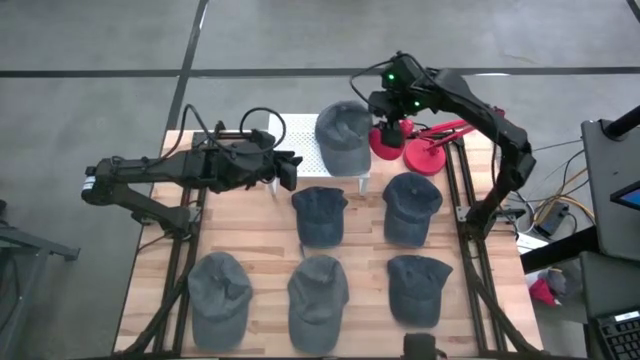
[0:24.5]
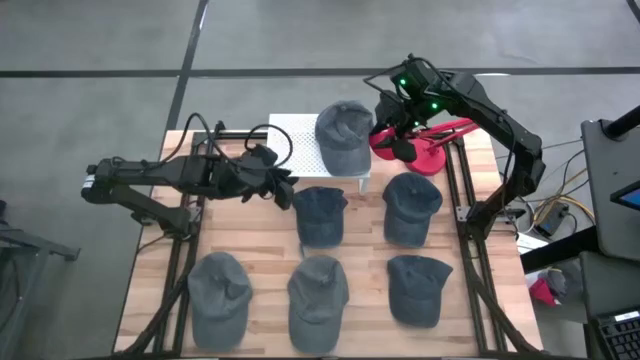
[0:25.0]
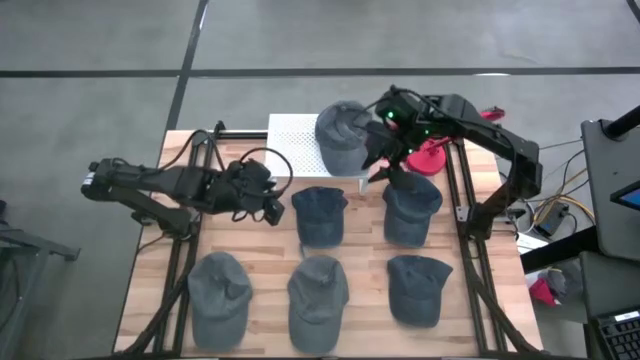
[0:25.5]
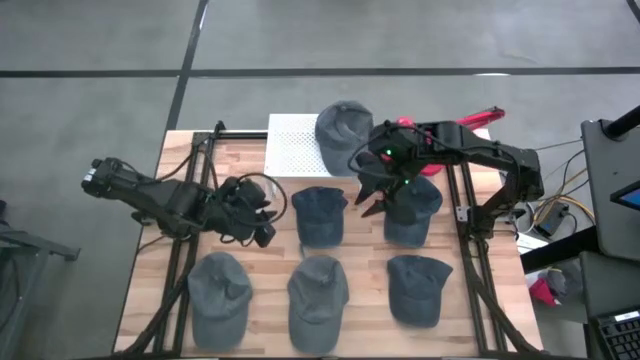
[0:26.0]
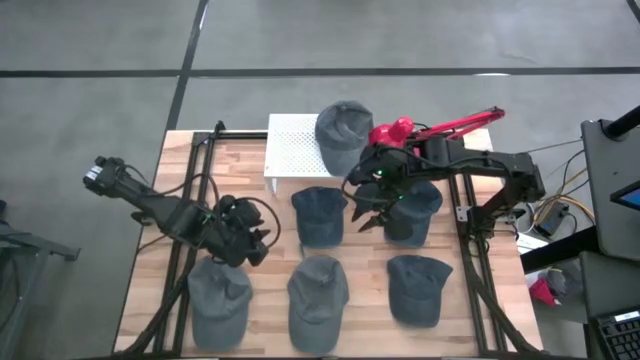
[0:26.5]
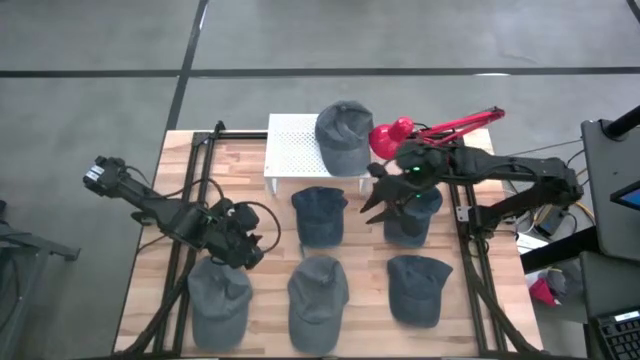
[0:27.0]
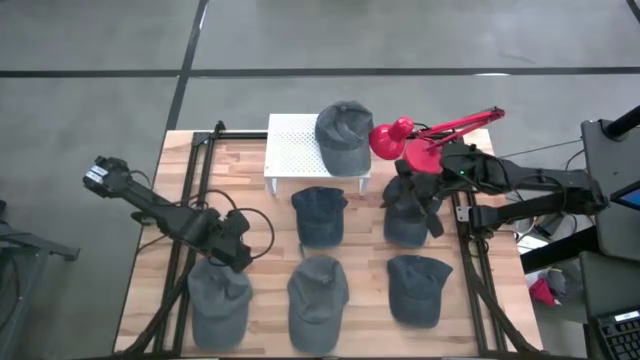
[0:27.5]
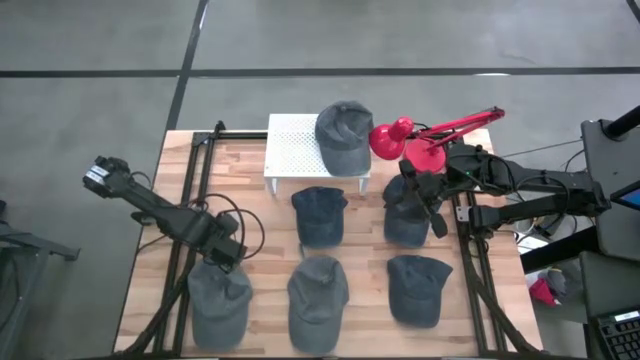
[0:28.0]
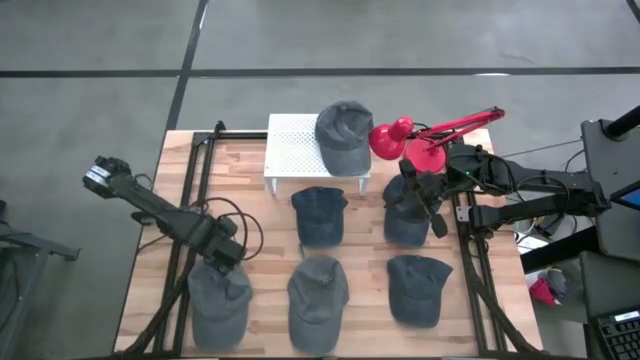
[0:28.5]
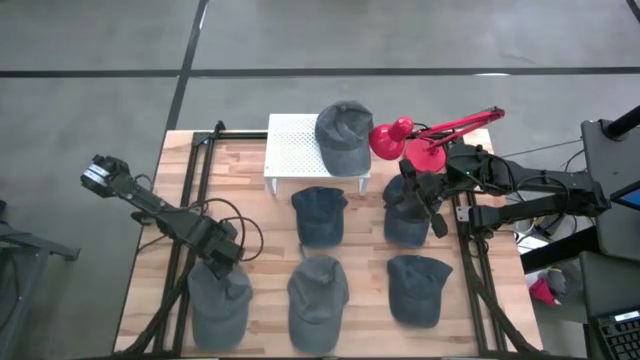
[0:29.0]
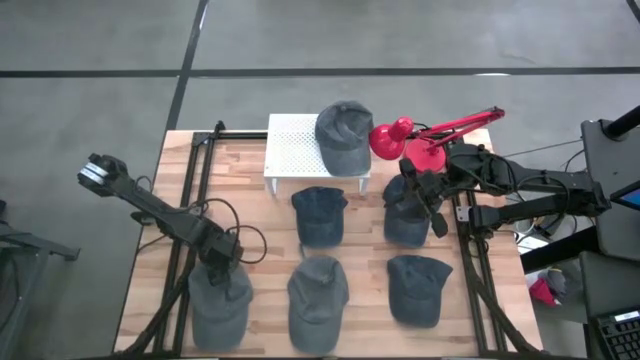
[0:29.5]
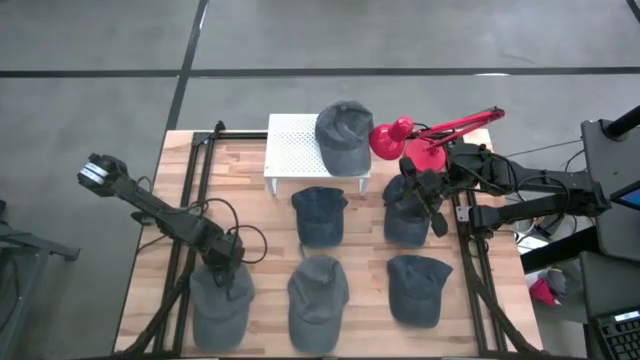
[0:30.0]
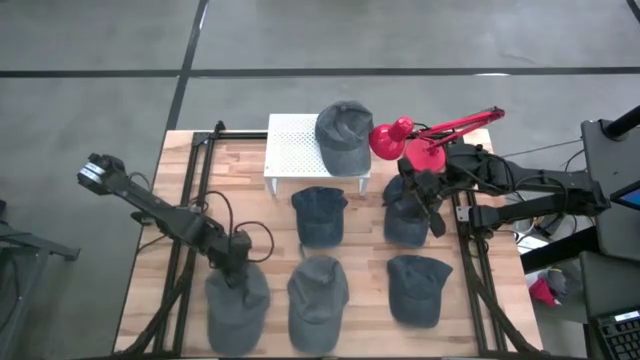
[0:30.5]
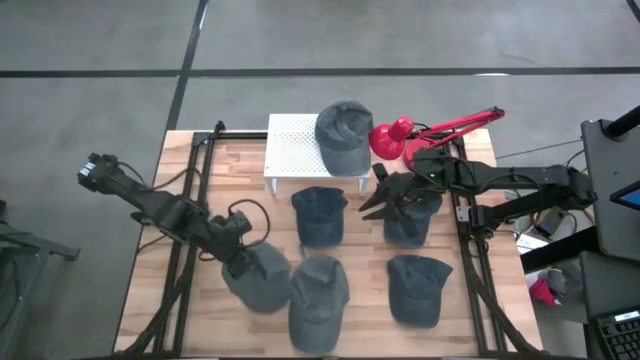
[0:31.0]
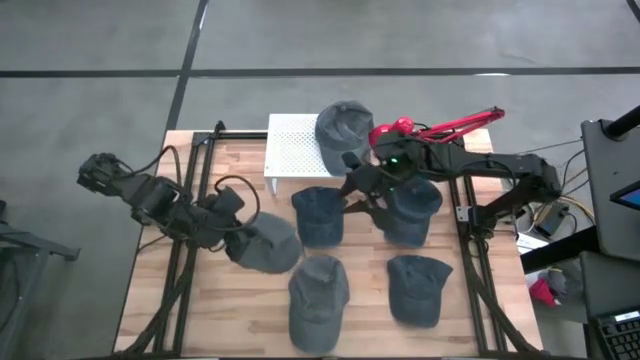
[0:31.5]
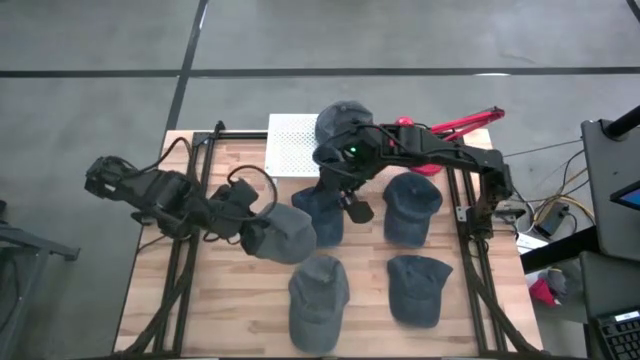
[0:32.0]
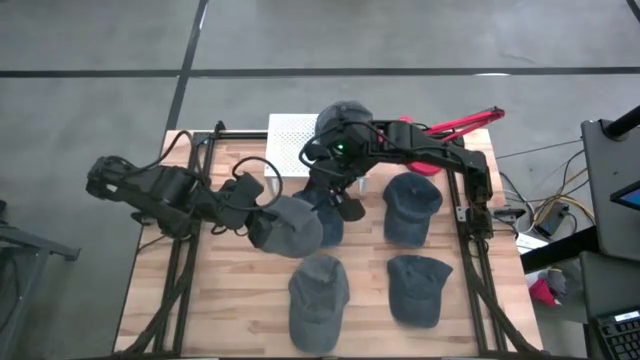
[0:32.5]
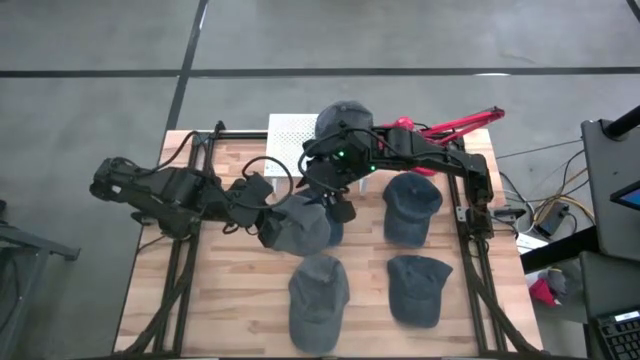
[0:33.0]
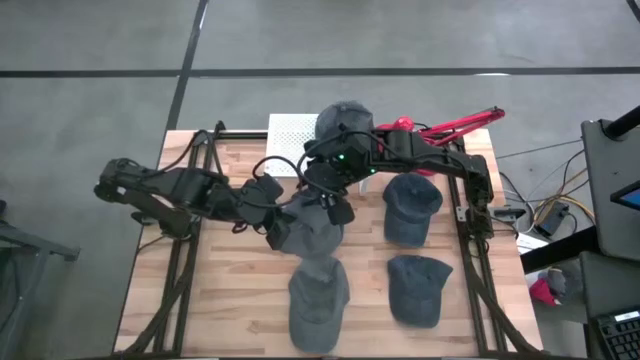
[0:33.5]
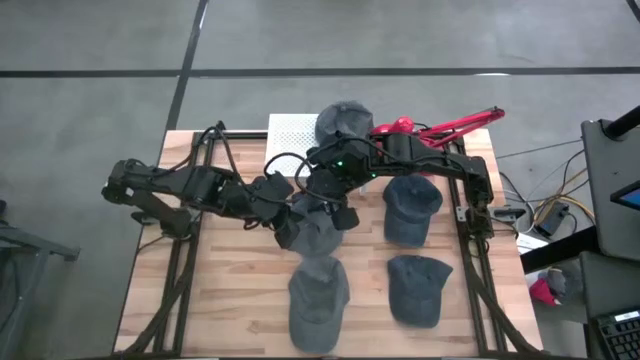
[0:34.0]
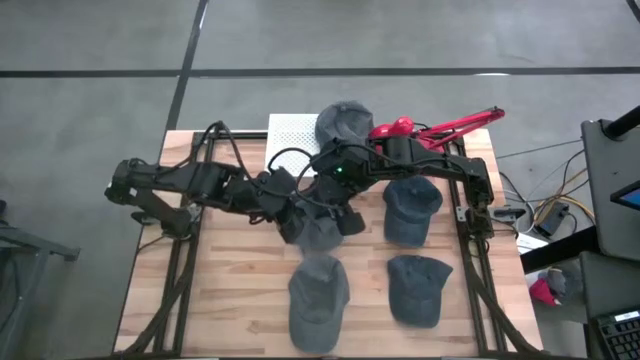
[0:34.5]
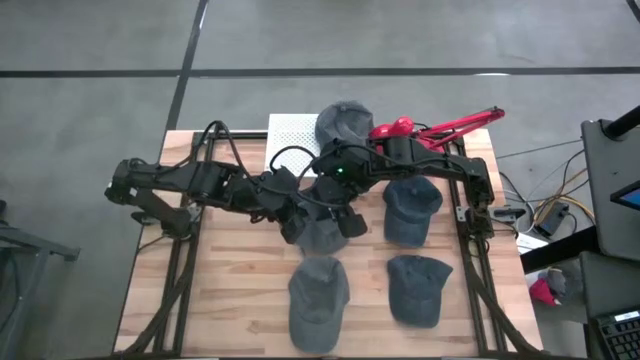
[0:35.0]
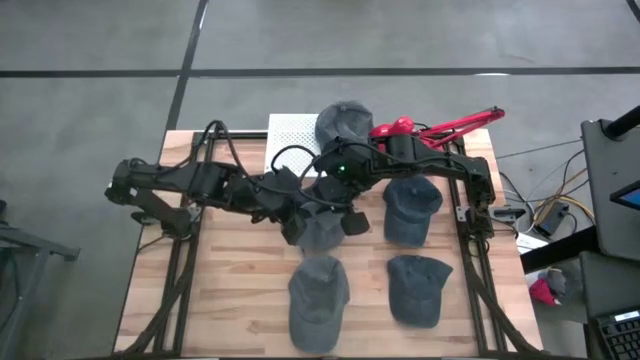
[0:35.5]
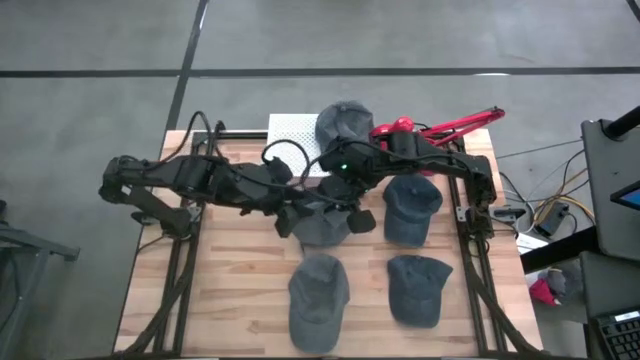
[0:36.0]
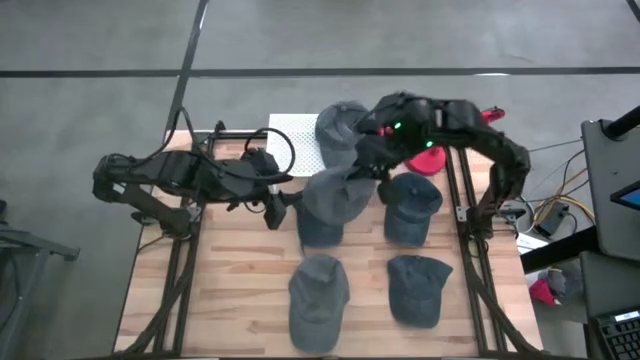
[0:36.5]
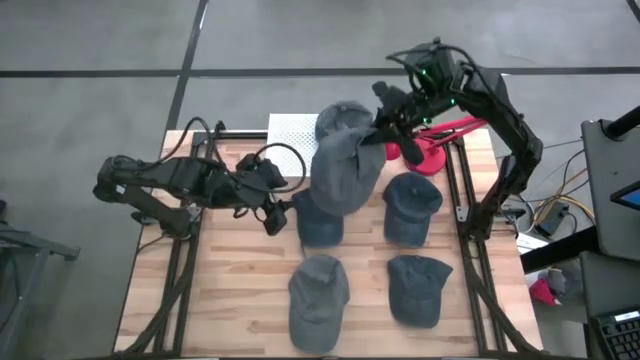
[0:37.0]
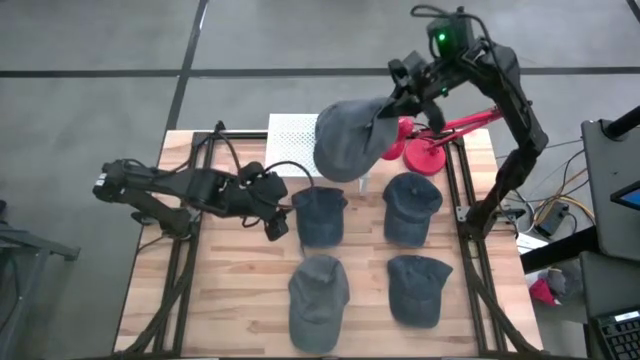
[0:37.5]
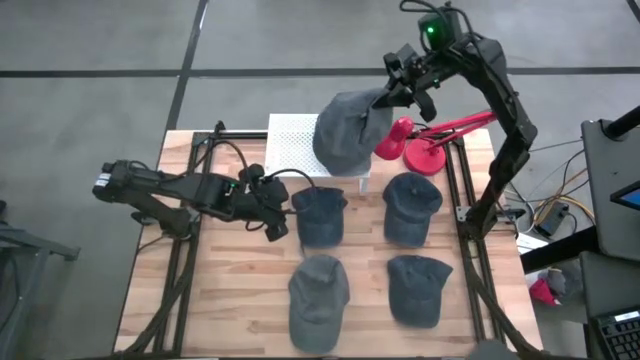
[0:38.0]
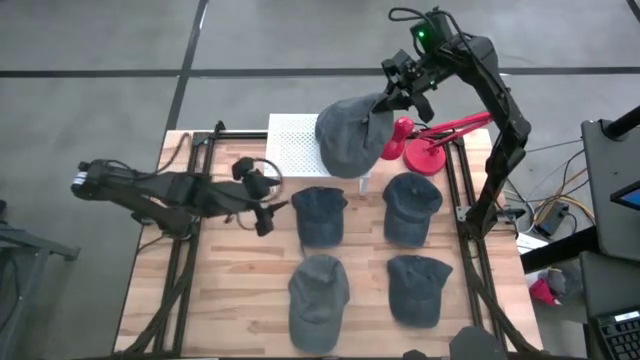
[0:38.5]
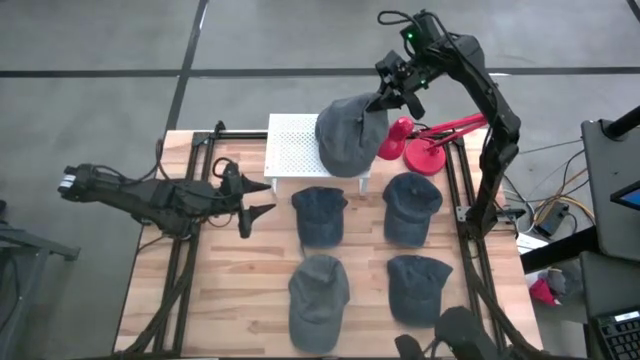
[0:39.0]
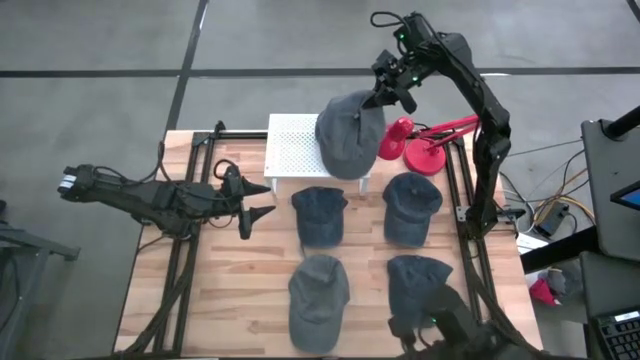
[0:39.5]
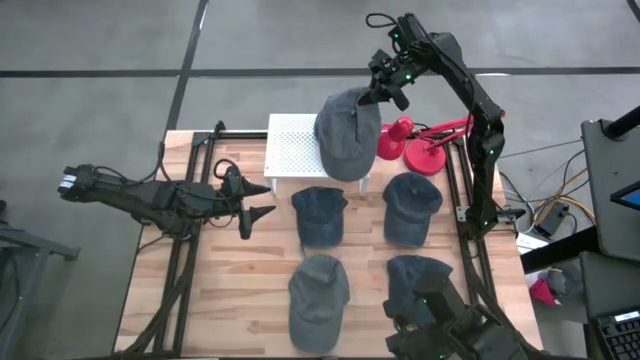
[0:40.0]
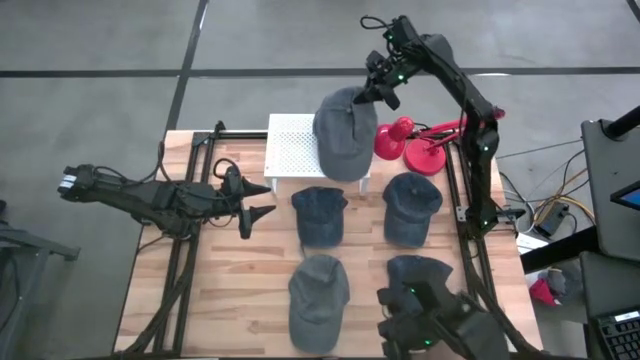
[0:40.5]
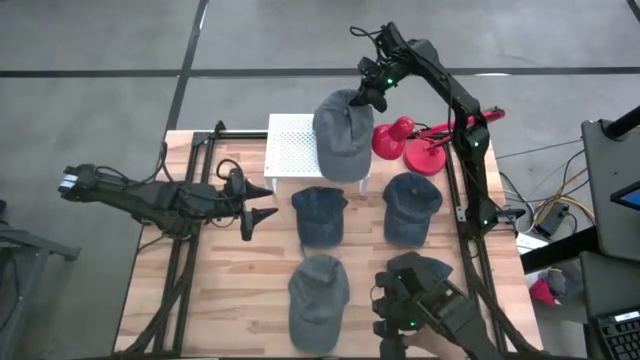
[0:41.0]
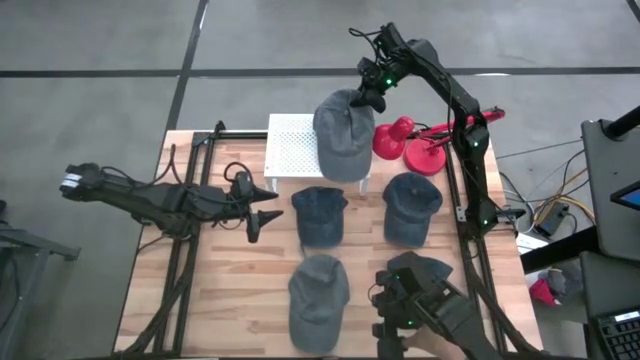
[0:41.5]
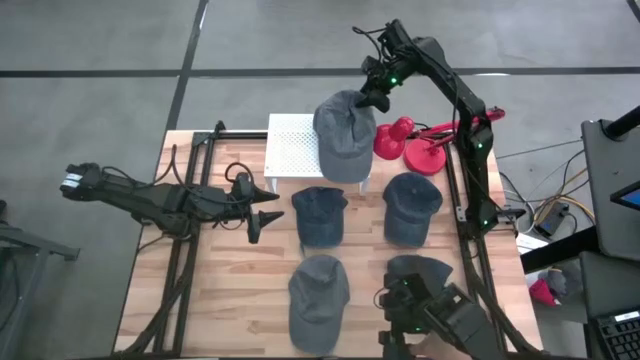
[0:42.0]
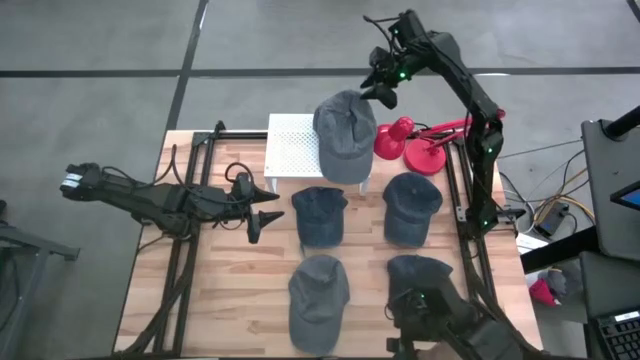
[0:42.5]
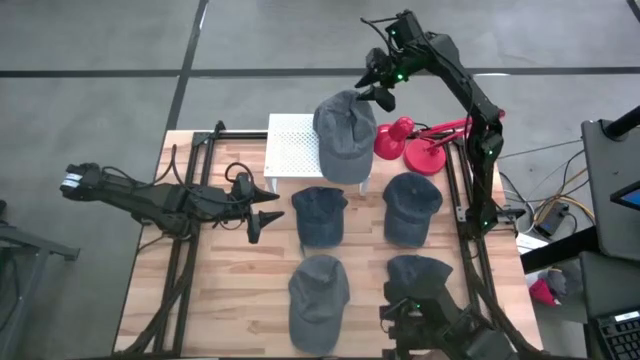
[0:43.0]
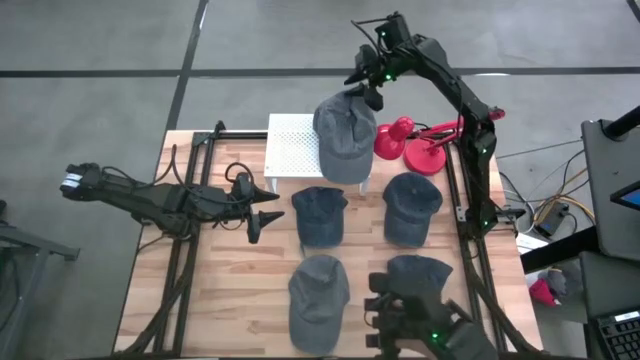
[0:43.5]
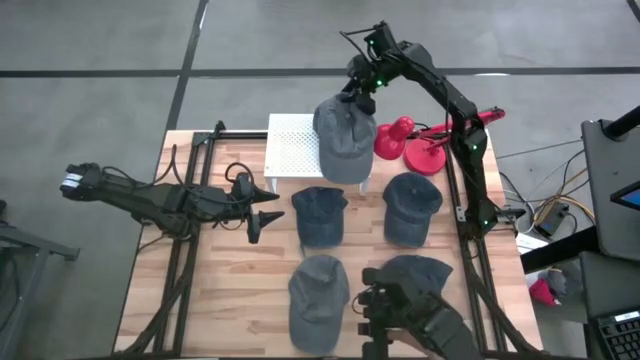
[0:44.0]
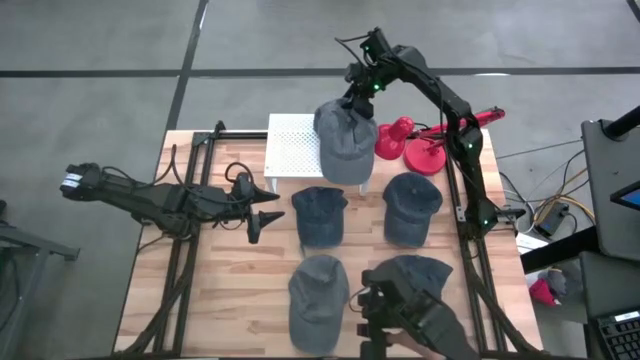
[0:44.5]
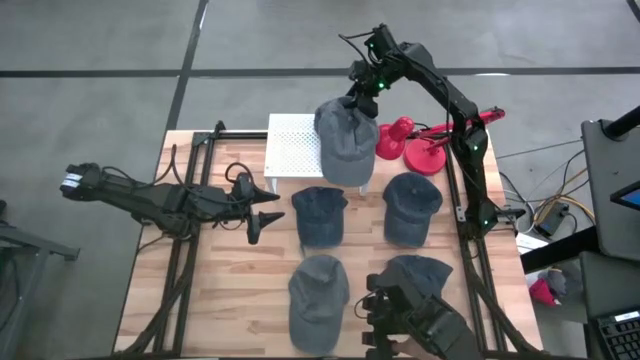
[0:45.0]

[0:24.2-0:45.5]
Task: Pick & Place hat
Stack the left gray cap on the gray cap on the shelf
